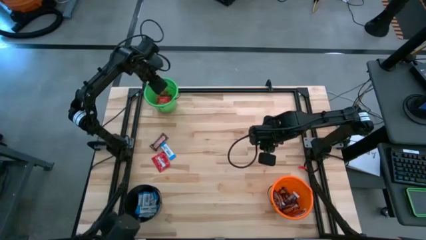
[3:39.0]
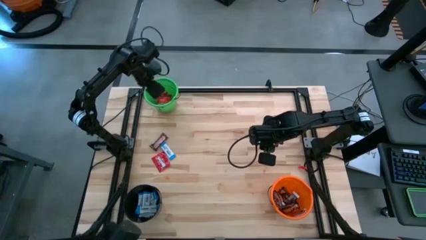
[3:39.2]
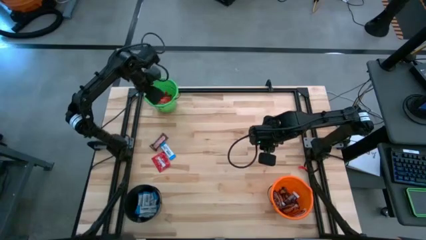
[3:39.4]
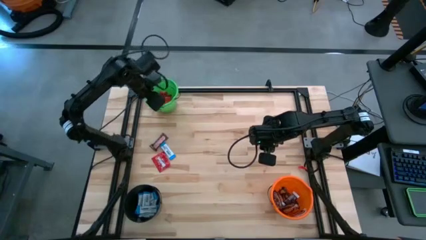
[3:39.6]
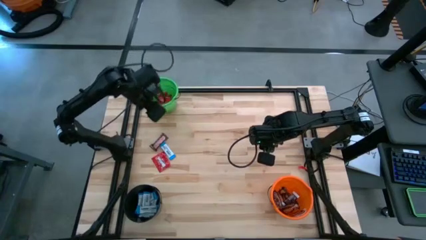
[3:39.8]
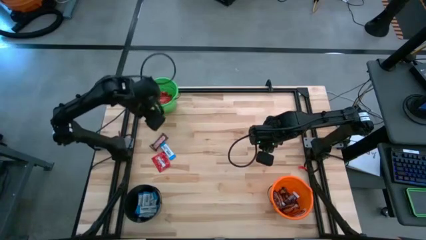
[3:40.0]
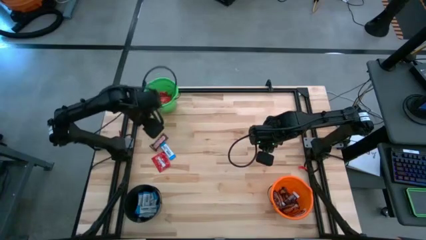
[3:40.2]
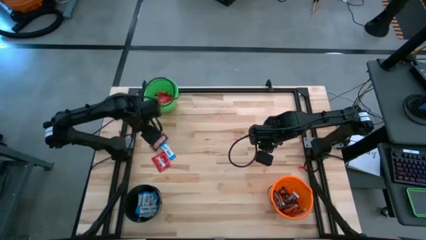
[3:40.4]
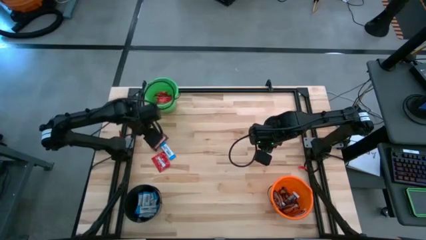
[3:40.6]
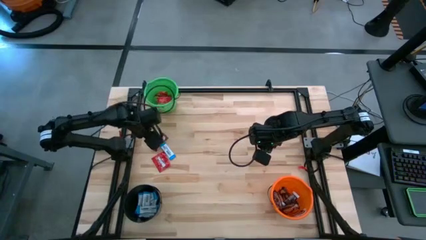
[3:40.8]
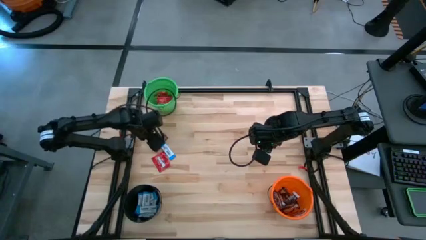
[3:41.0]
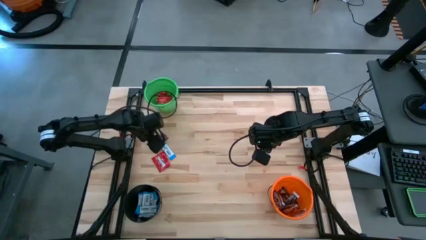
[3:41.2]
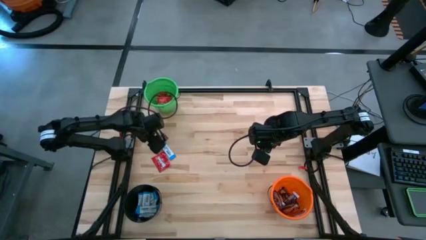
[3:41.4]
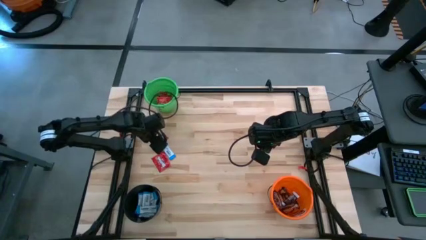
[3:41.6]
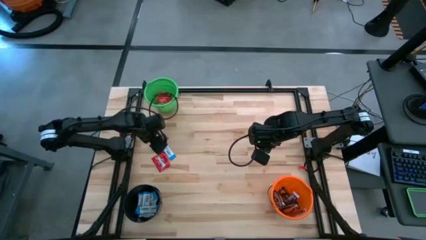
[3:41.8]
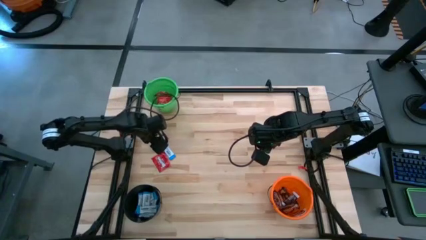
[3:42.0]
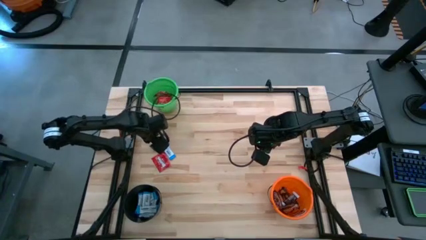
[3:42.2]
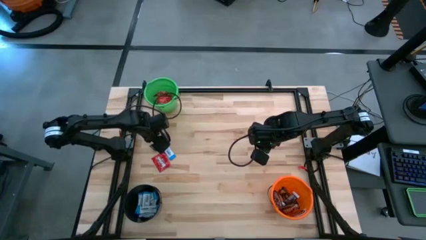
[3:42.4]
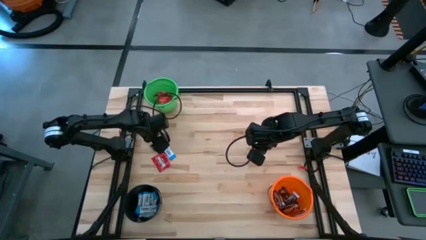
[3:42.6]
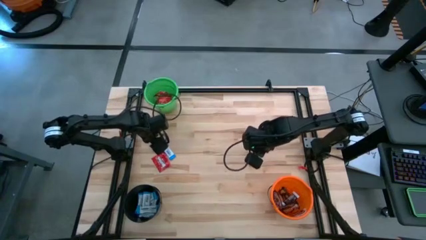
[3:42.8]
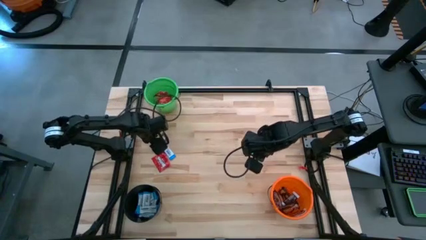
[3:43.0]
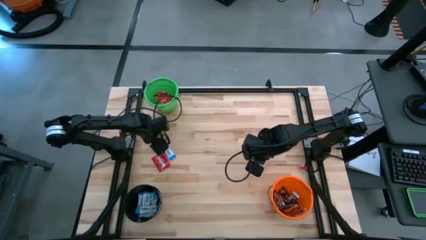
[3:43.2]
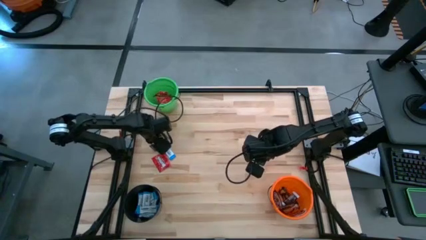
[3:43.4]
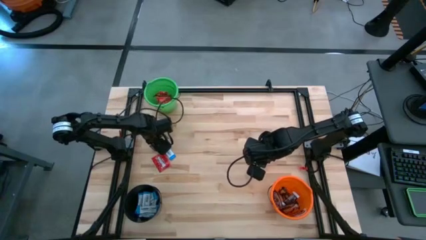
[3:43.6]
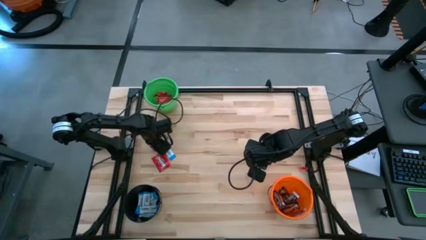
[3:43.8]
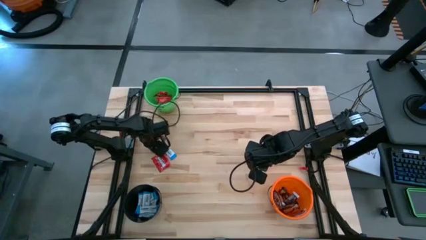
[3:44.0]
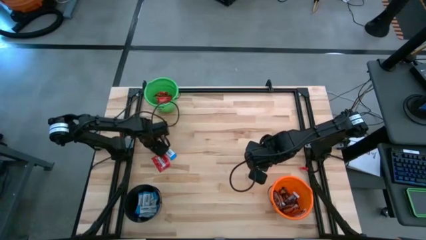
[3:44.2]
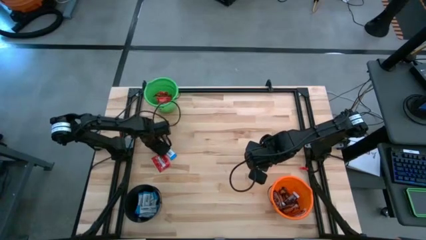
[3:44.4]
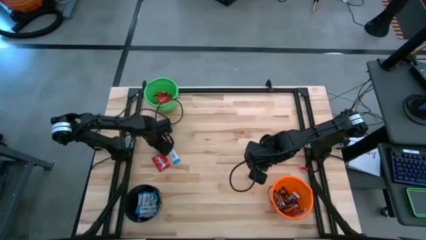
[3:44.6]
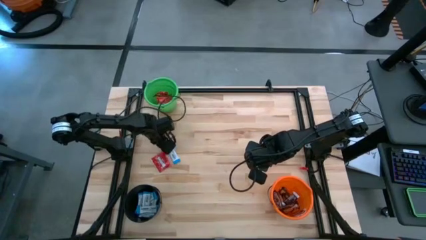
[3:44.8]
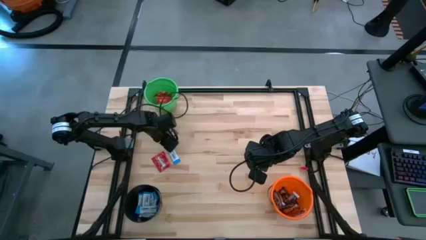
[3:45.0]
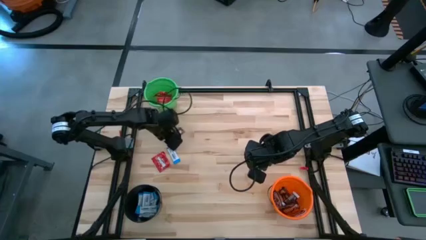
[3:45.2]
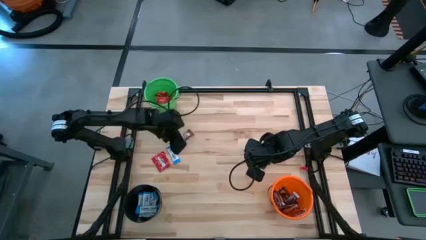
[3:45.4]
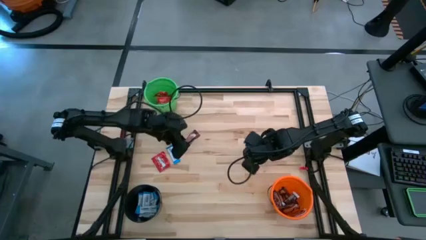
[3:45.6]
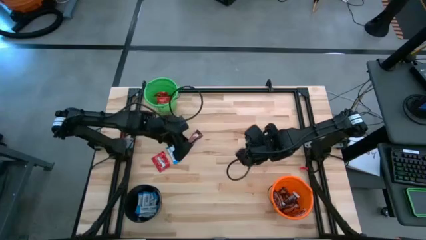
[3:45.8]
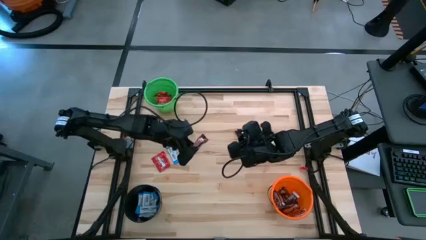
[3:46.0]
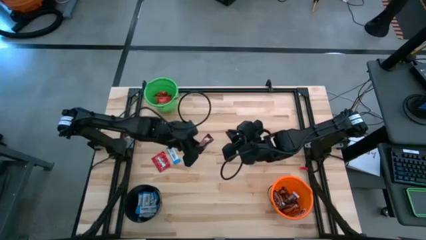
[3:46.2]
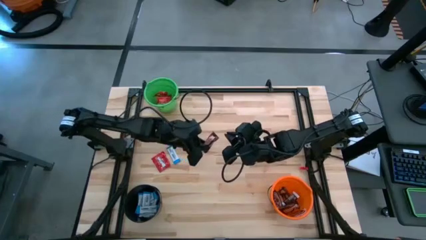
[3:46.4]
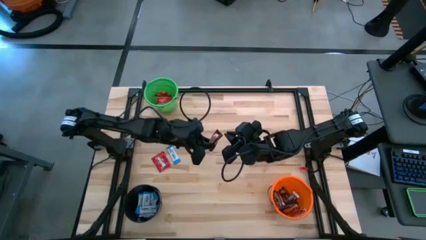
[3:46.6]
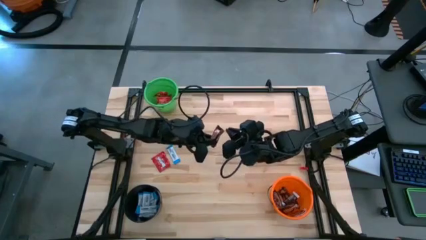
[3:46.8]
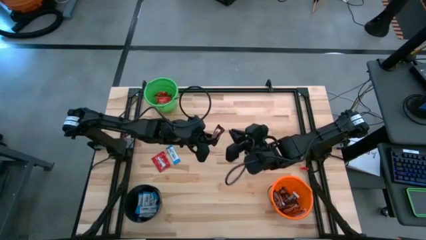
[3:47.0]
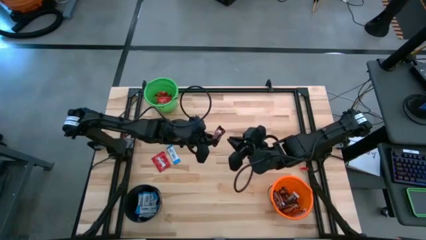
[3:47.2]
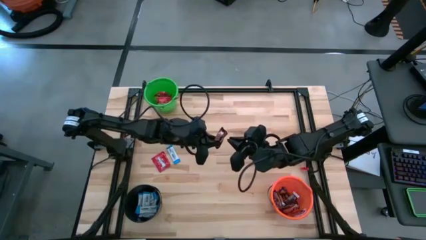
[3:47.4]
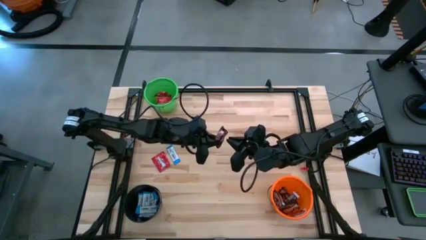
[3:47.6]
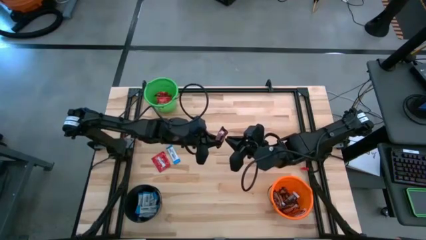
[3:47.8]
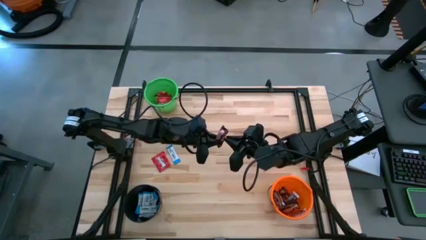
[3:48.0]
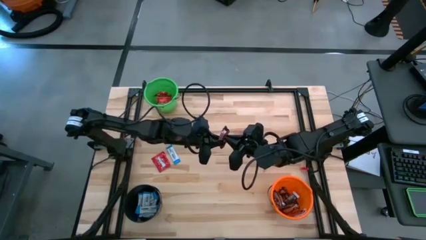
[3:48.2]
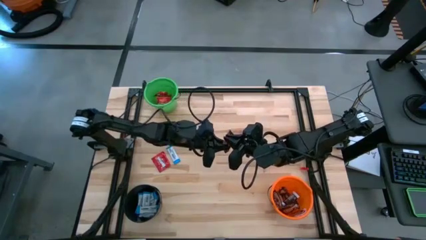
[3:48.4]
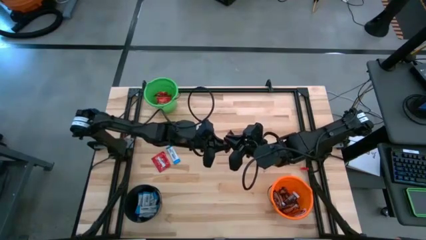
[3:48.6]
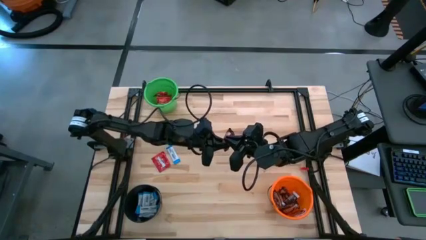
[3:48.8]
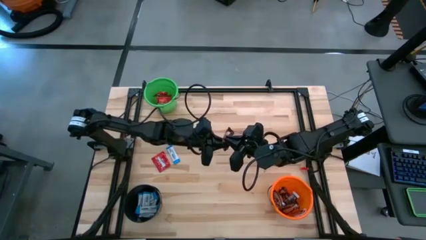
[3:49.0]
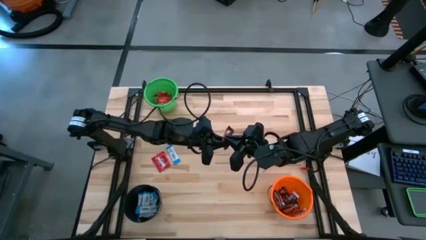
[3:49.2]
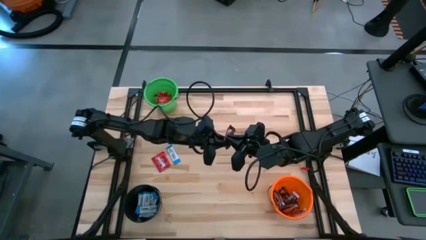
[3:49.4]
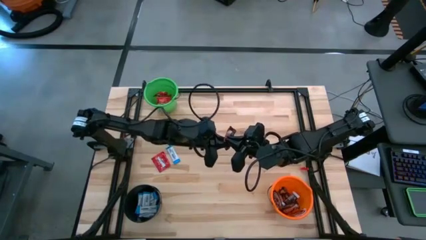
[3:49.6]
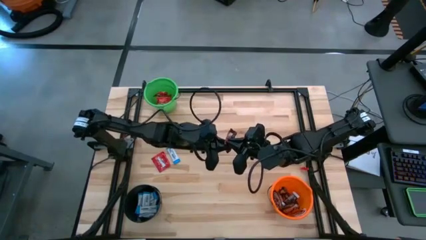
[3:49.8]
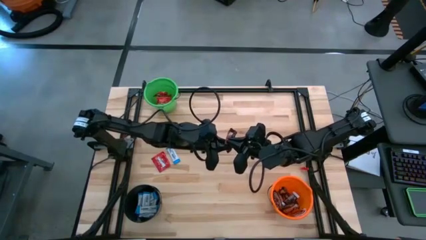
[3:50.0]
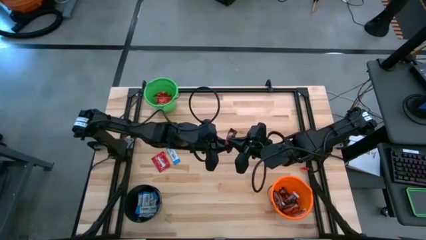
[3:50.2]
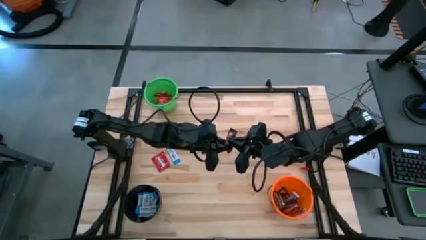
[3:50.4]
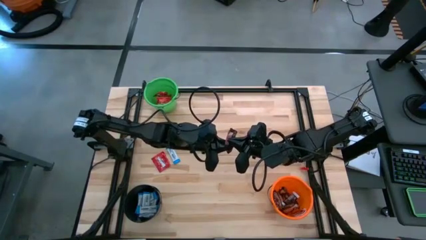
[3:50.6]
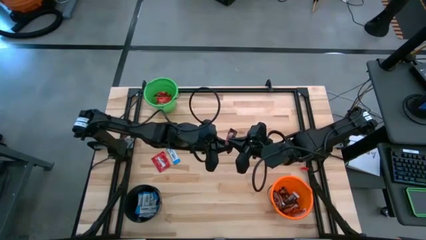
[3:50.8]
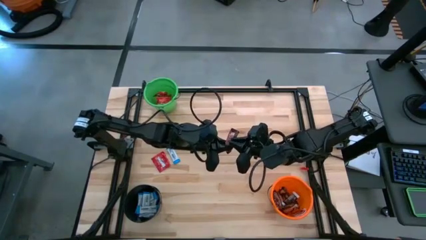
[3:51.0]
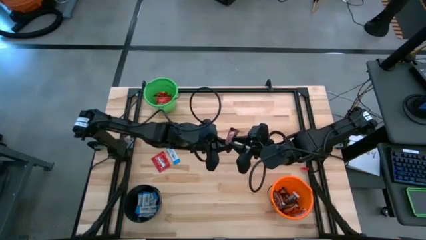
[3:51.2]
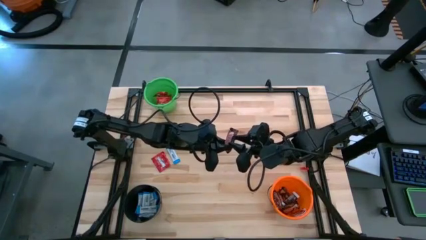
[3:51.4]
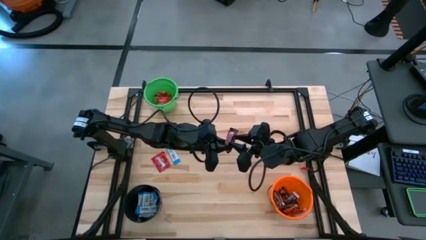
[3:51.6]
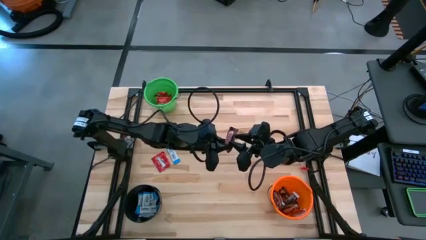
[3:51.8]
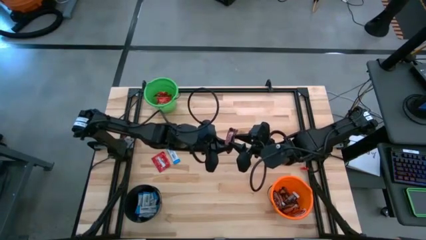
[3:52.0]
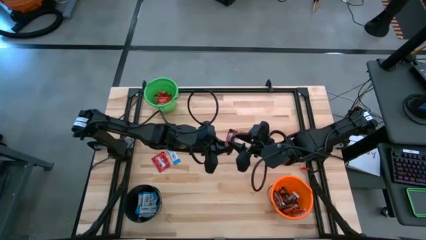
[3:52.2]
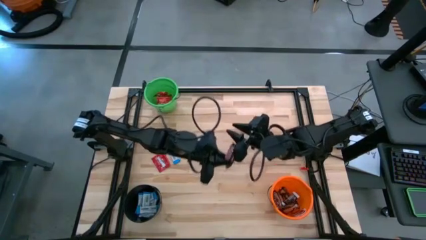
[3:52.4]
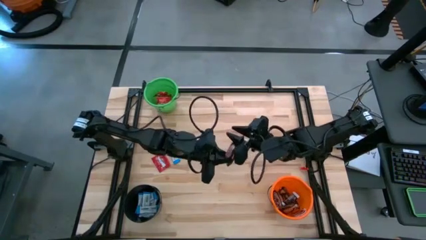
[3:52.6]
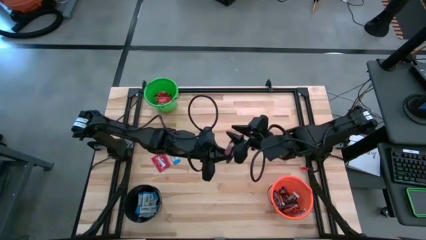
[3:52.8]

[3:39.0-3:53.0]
Task: Sort candy
Put the brown chocolate into the orange bucket

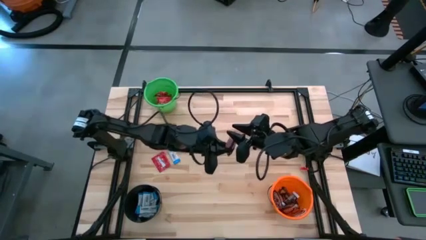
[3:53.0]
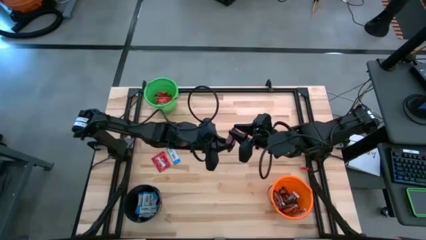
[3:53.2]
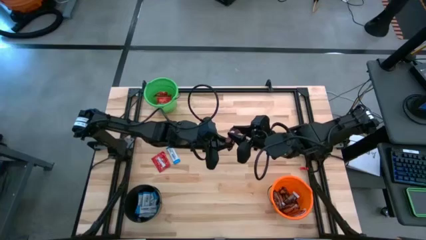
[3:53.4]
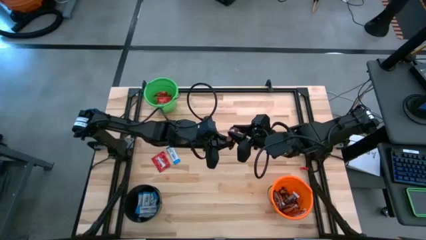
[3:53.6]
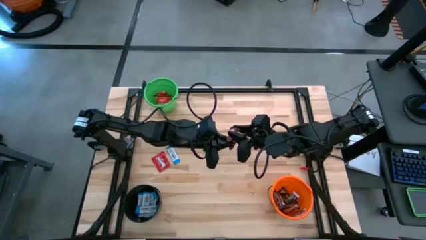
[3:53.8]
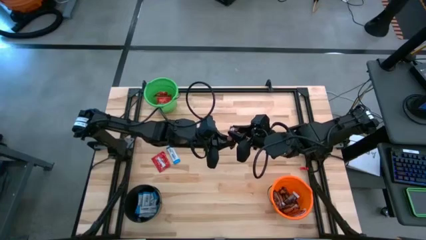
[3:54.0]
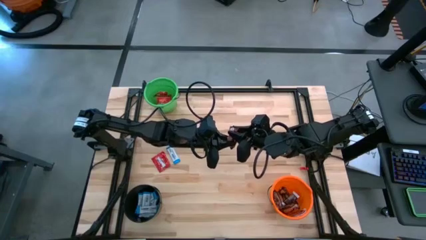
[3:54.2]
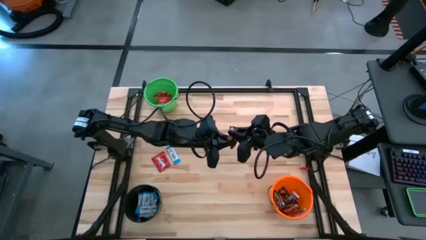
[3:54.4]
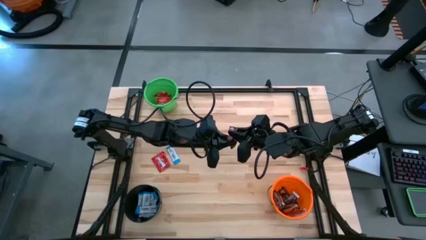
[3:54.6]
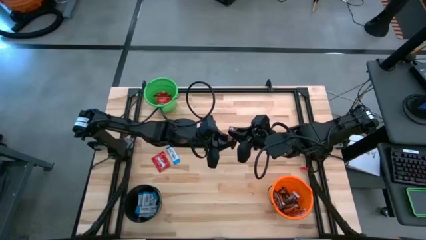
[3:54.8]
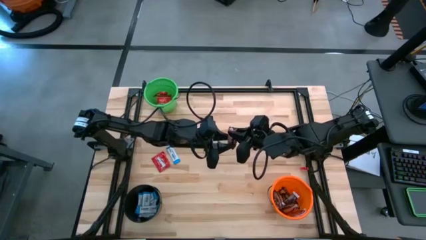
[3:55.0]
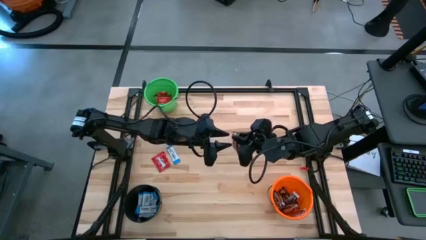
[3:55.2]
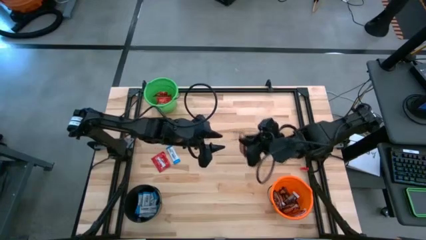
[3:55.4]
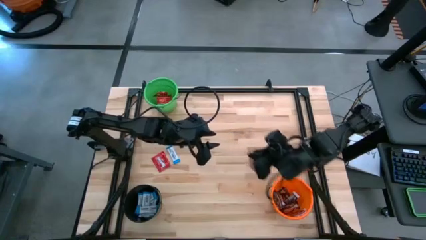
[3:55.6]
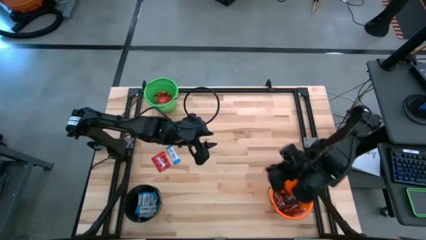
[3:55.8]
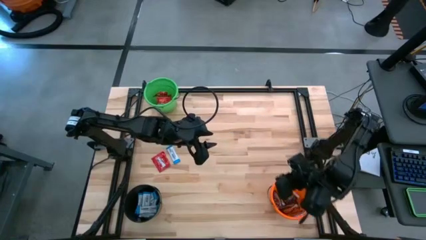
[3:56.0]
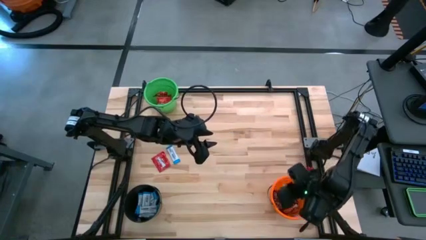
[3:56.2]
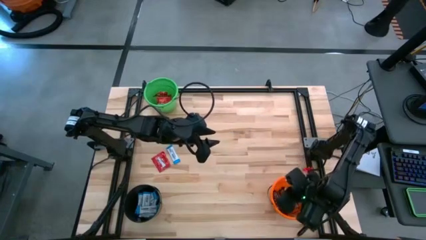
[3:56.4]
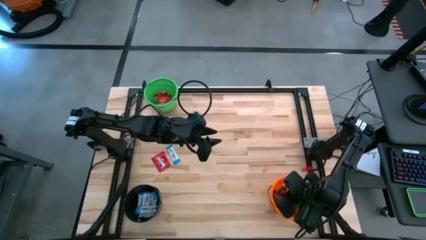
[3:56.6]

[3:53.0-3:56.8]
Put the brown chocolate into the orange bucket
